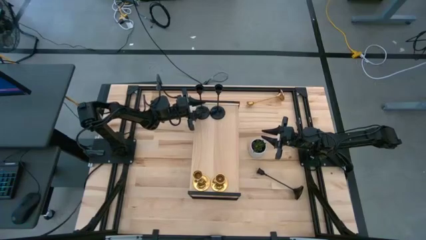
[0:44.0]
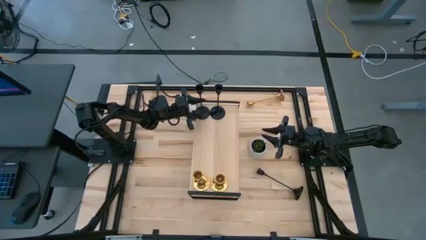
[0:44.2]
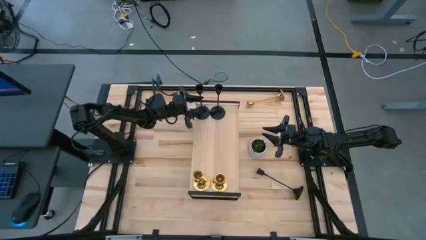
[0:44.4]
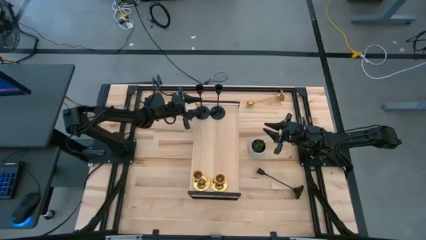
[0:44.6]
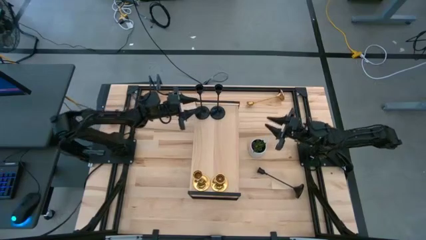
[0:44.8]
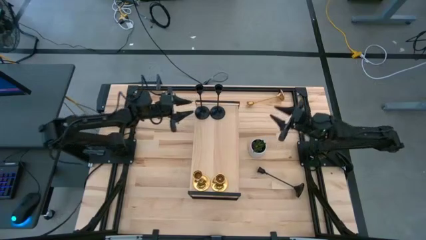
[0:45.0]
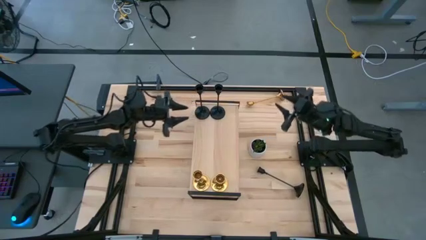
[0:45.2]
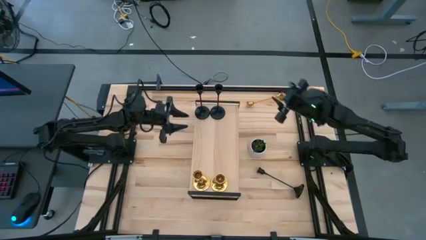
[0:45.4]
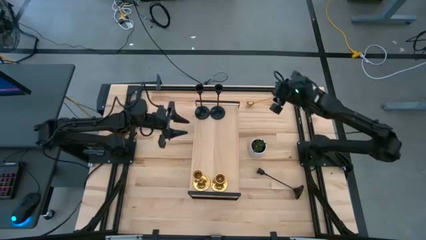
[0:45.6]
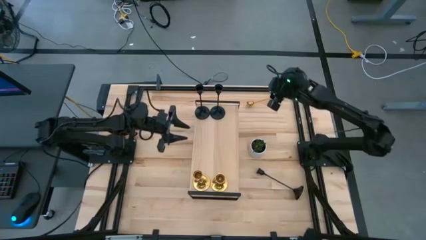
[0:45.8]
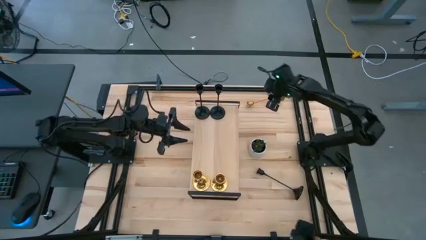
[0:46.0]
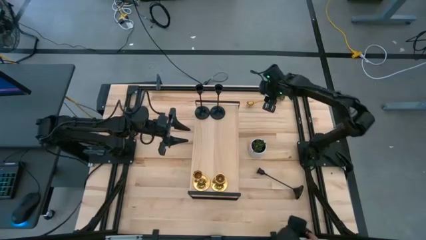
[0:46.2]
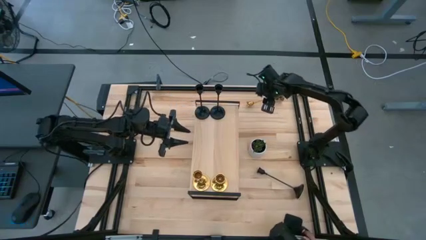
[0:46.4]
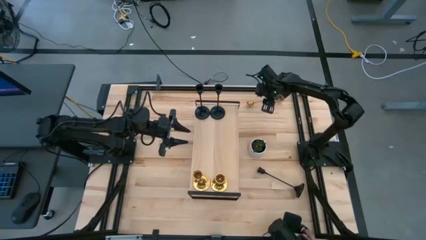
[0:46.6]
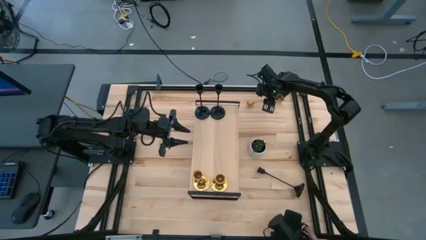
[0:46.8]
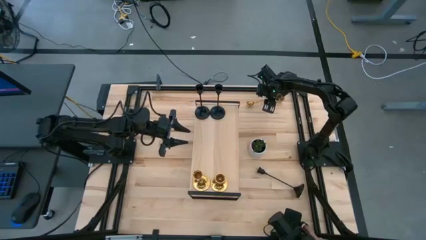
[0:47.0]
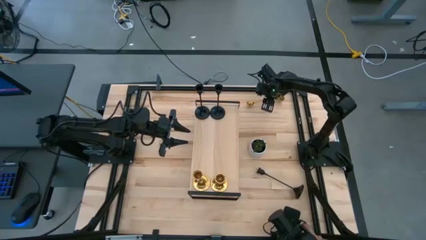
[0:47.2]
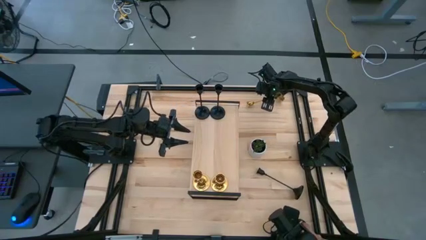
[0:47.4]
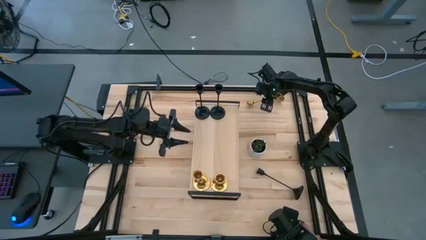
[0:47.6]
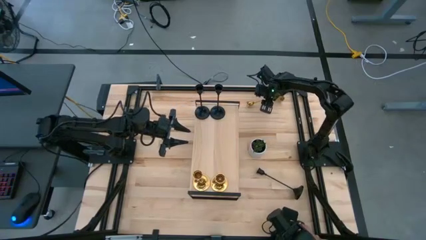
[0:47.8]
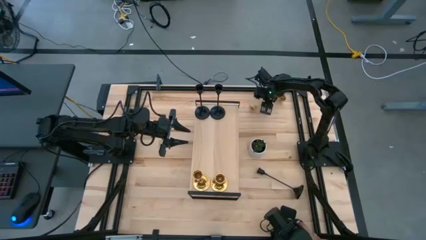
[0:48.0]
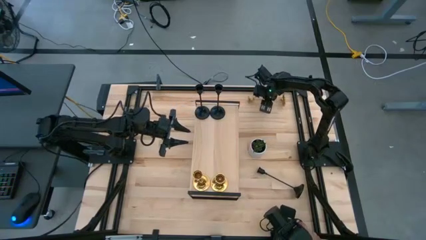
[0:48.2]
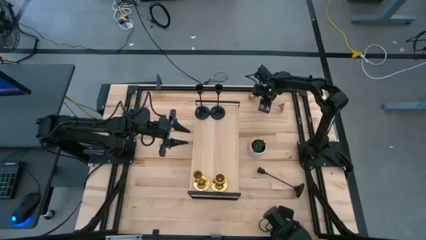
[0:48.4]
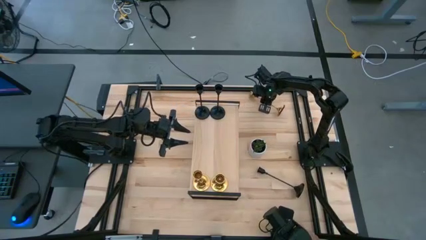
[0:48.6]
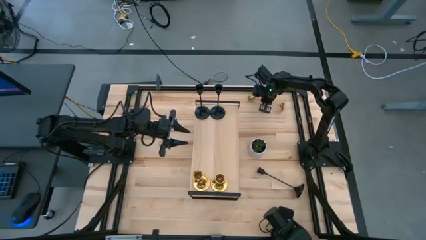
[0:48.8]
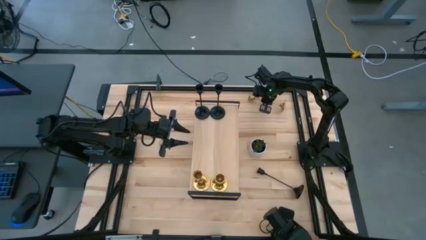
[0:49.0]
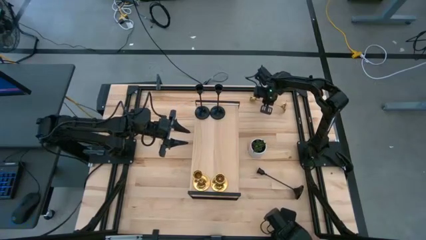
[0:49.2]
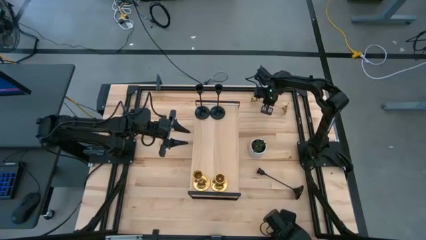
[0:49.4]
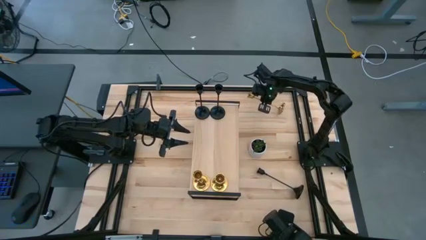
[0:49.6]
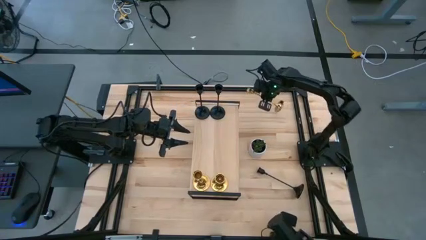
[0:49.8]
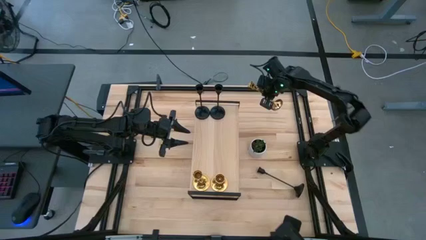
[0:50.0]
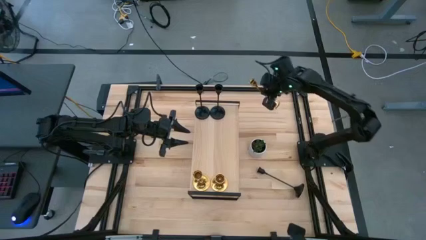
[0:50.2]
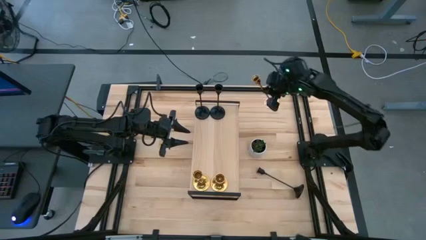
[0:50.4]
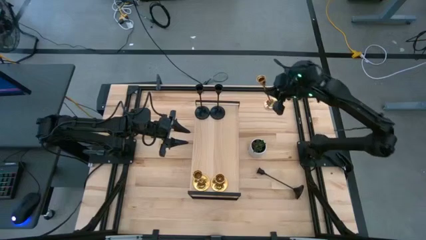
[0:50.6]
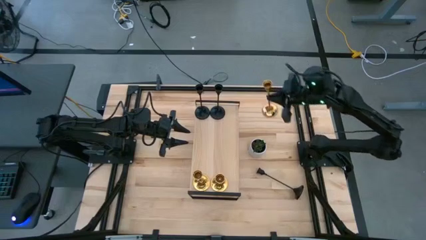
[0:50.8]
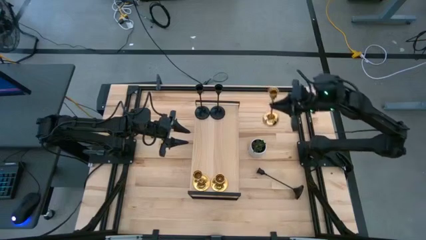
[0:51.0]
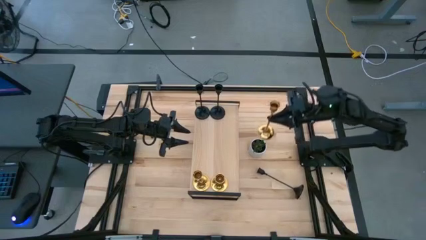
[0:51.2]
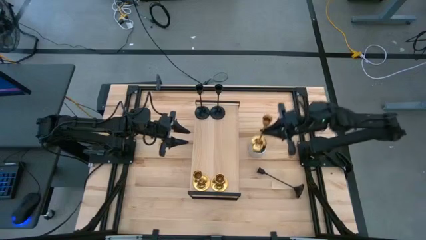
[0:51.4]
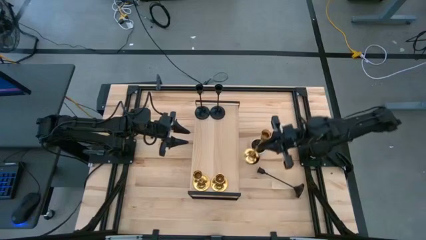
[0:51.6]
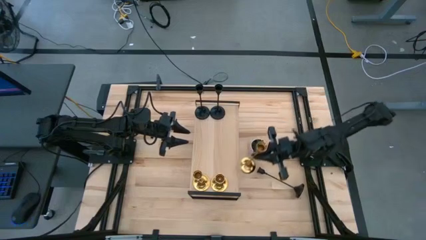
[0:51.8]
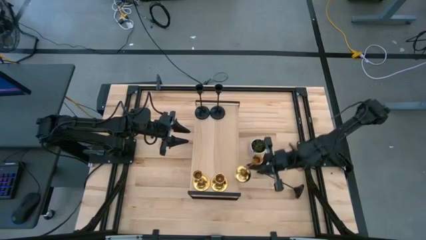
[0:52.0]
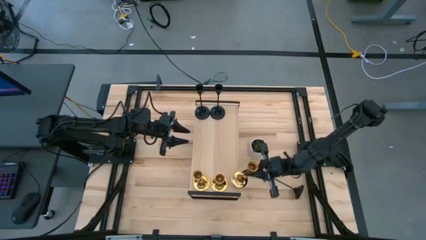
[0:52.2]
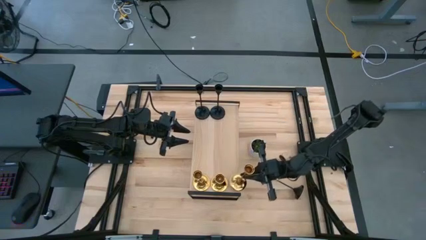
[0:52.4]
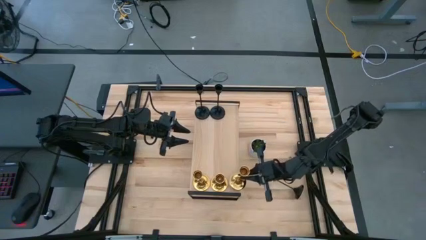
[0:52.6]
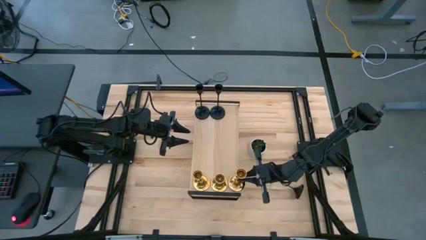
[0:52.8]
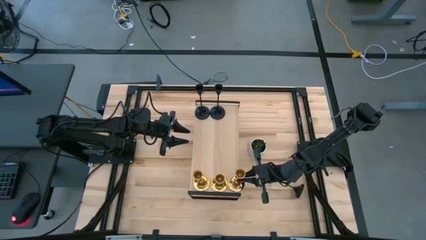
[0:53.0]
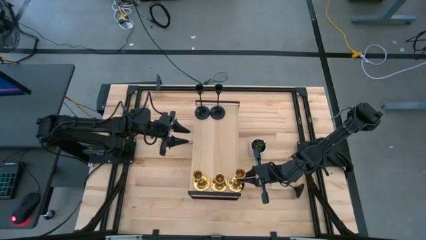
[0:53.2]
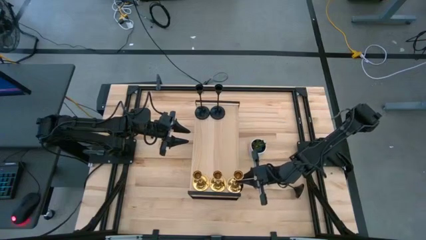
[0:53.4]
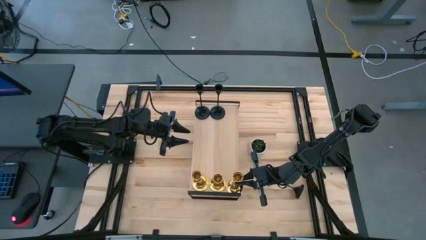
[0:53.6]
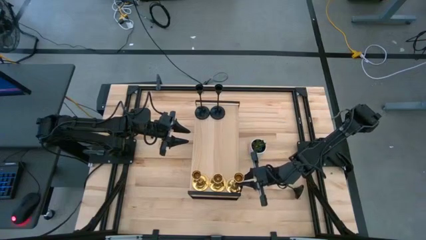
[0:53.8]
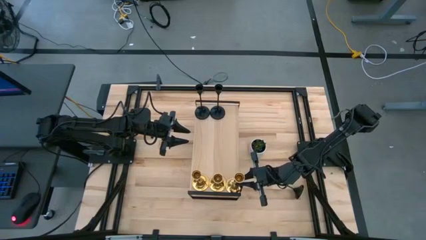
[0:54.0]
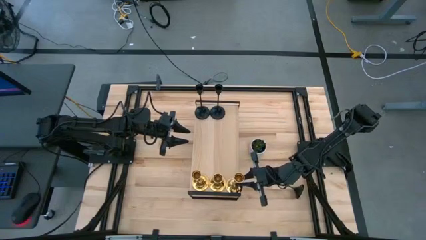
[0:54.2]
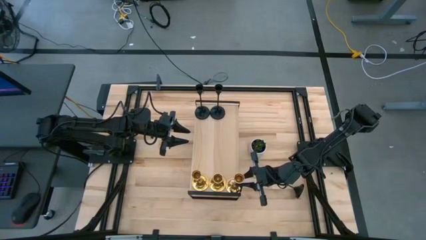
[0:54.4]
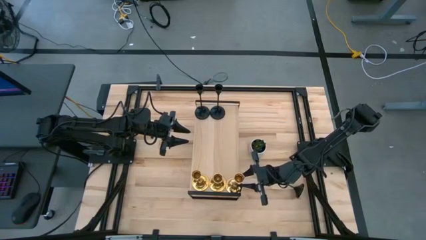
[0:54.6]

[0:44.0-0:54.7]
Task: Pick & Place candle stick holders
Put the gold candle holder on the shelf aligned with the other gold candle holders

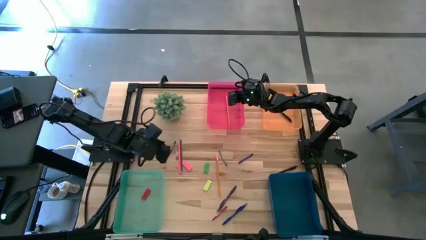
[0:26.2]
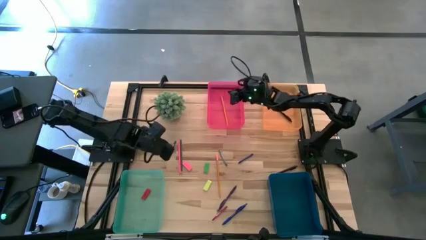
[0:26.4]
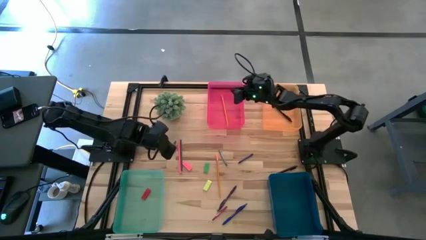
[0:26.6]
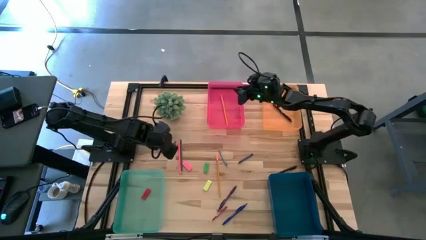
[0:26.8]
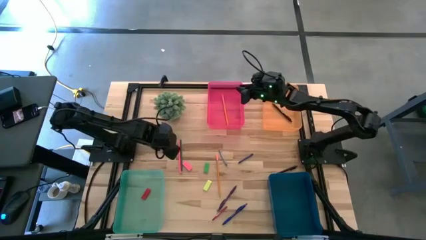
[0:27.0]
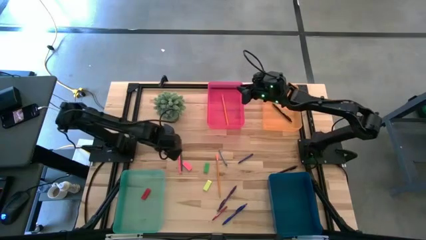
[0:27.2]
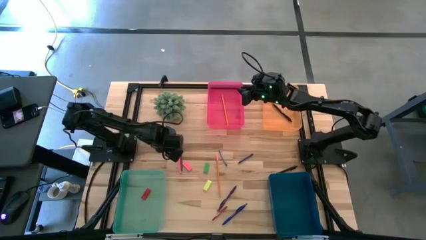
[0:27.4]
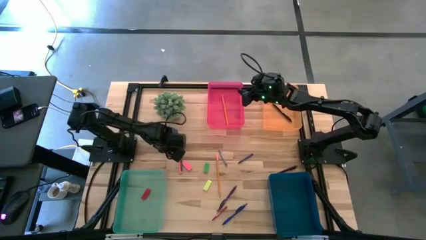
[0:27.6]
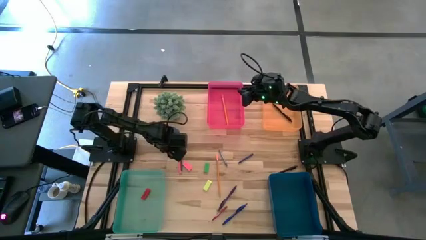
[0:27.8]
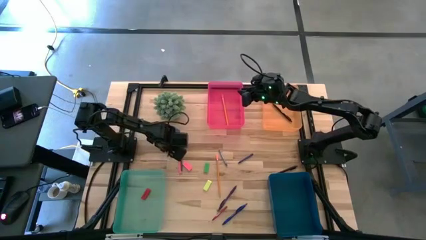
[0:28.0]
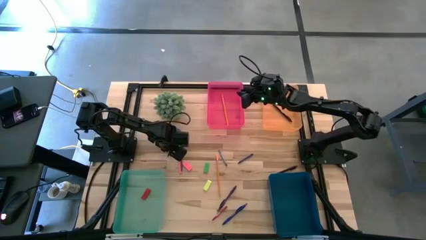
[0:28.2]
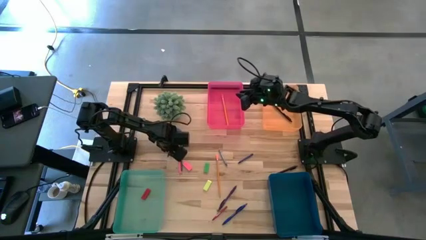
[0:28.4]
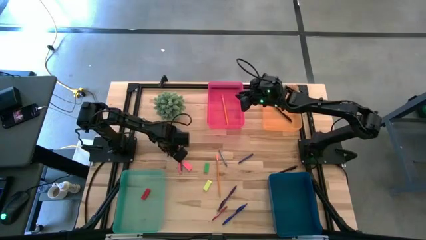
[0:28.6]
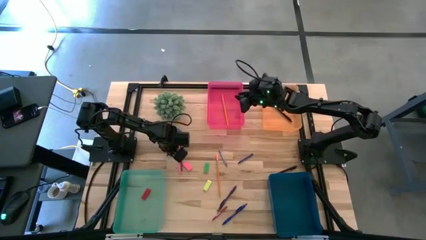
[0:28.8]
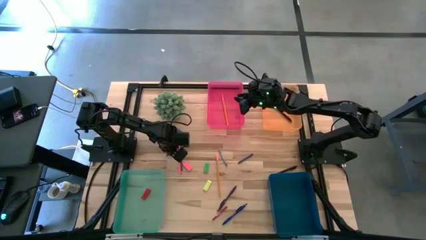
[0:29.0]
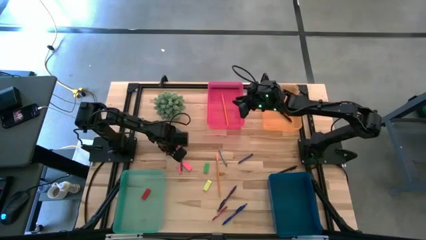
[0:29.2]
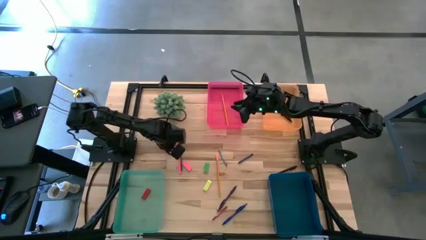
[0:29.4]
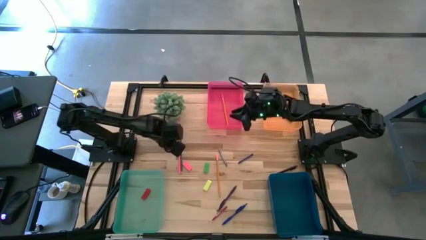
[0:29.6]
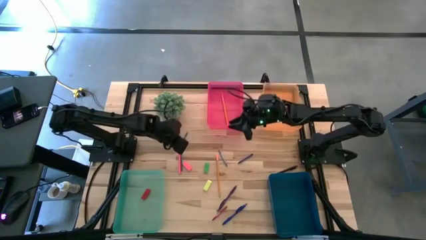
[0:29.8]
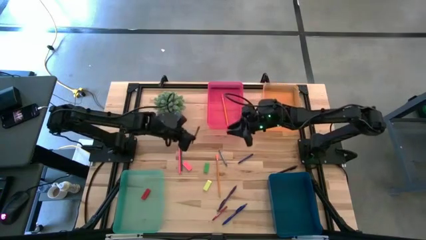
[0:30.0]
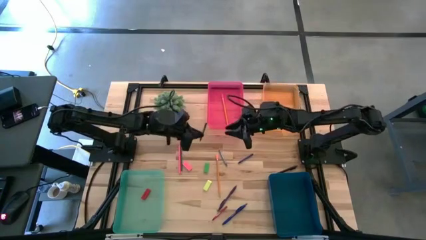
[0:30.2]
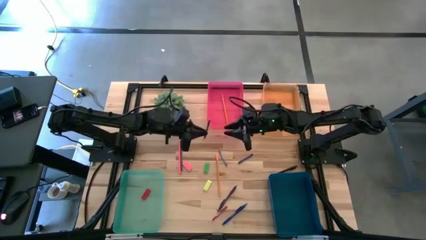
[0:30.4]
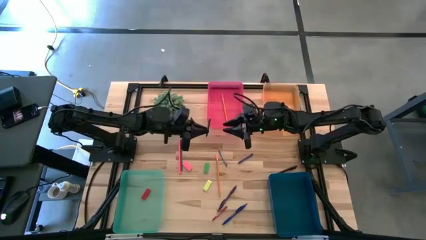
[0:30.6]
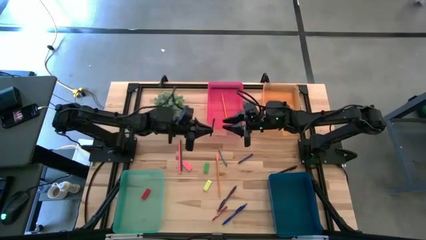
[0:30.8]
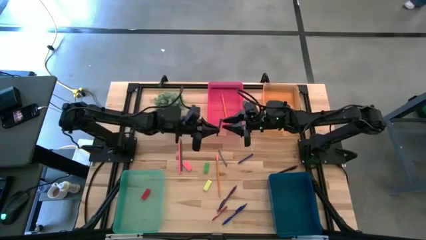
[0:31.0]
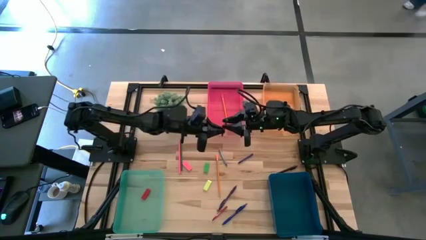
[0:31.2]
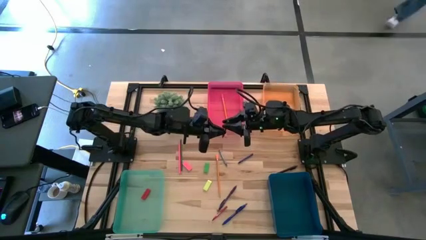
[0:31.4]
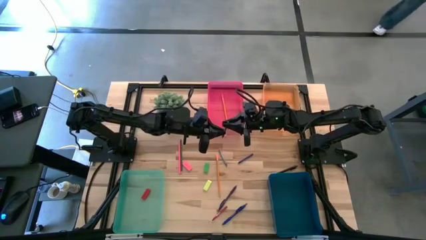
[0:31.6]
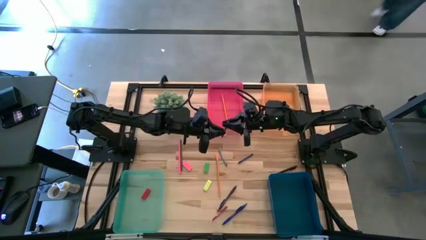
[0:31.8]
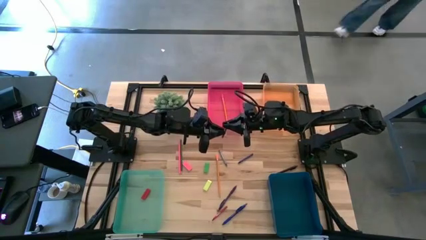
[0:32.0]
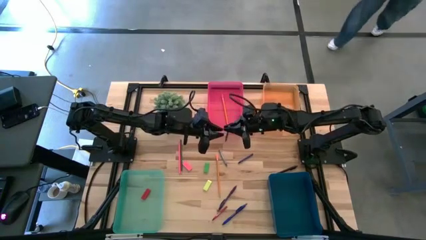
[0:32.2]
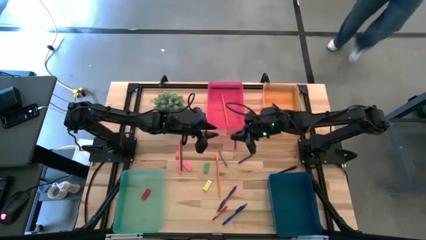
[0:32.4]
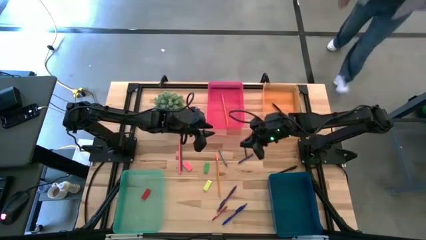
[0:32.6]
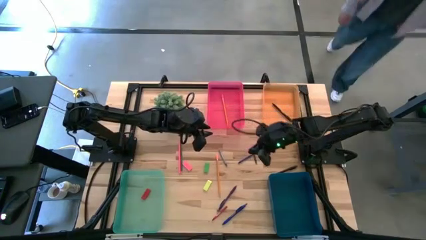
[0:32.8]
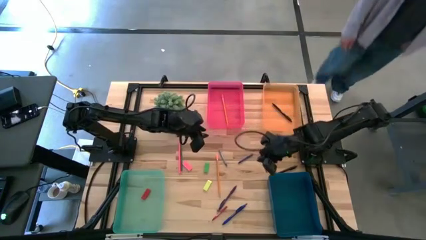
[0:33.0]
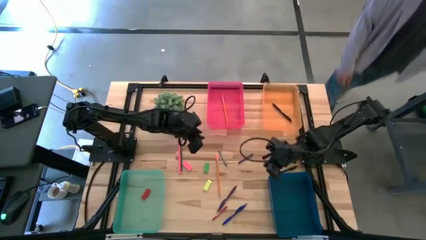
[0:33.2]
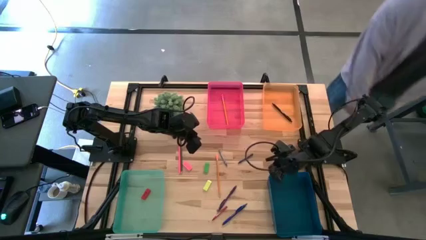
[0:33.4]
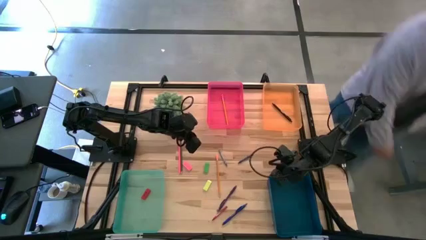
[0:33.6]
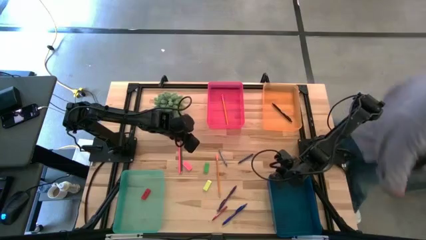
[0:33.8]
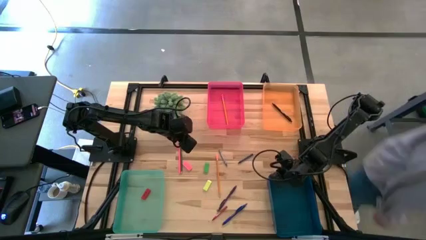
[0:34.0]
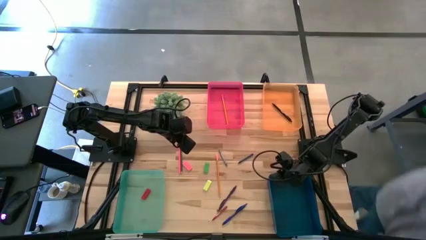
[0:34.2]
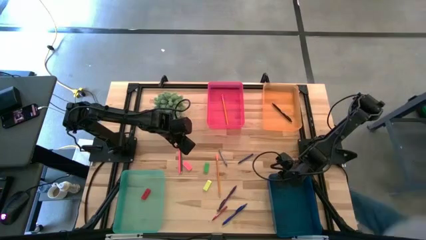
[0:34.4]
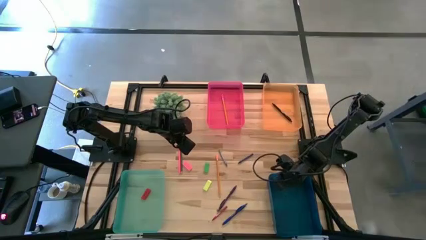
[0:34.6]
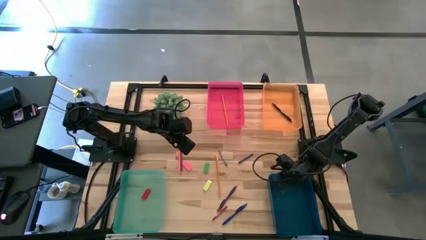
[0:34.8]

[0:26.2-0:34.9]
Task: Sort crayons/erasers/pens/pencils in bins
Put the green crayon into the blue bin
